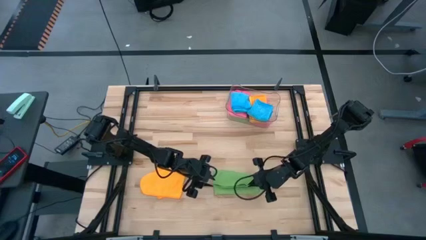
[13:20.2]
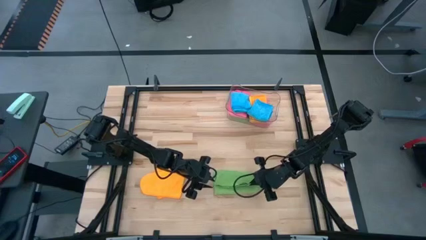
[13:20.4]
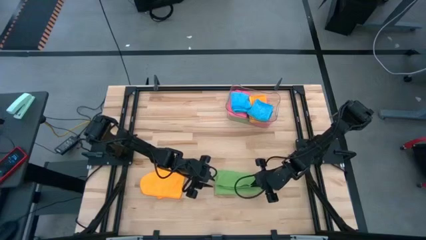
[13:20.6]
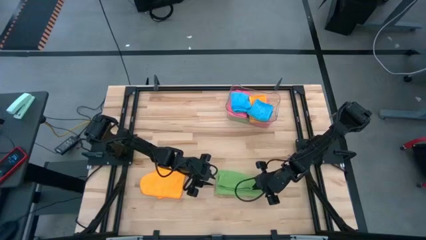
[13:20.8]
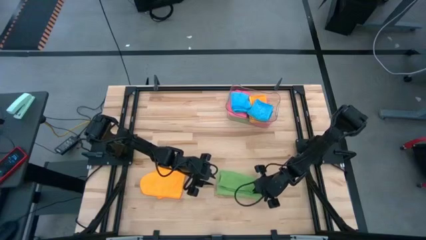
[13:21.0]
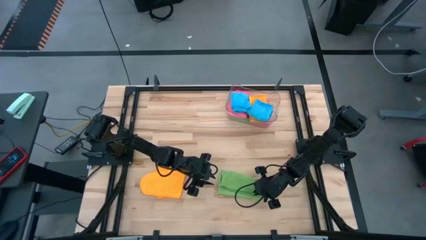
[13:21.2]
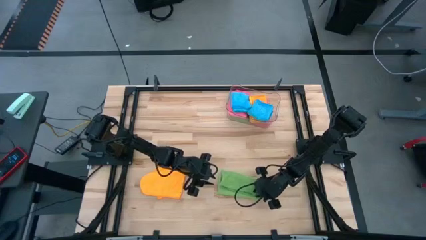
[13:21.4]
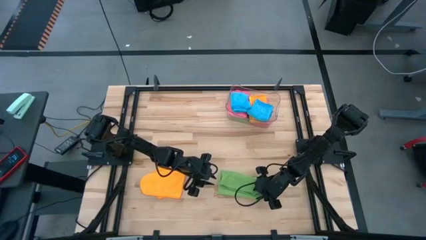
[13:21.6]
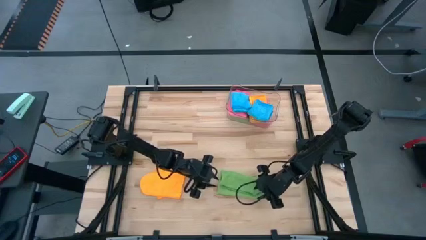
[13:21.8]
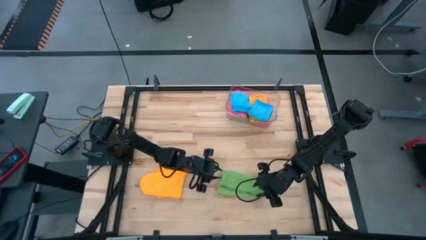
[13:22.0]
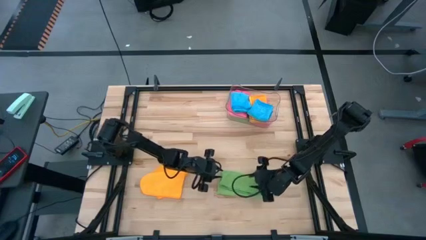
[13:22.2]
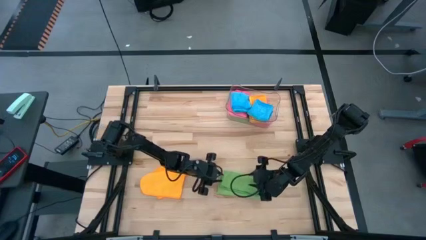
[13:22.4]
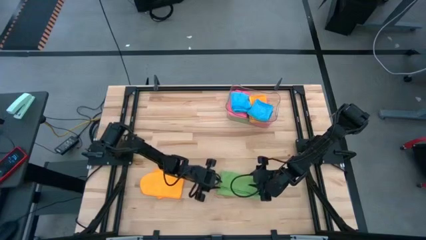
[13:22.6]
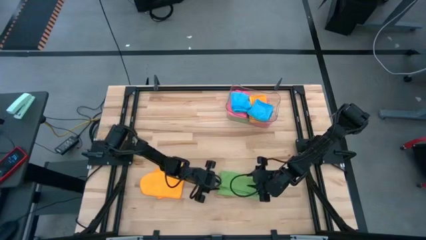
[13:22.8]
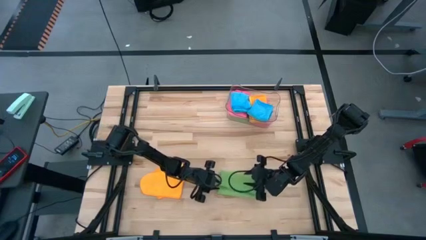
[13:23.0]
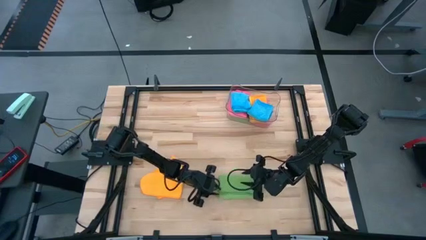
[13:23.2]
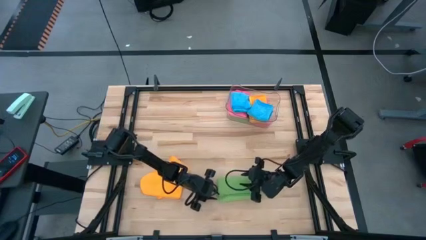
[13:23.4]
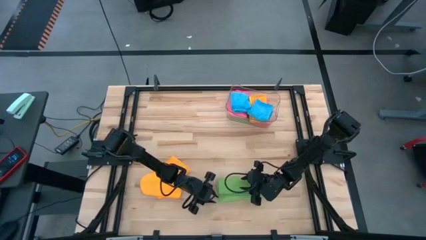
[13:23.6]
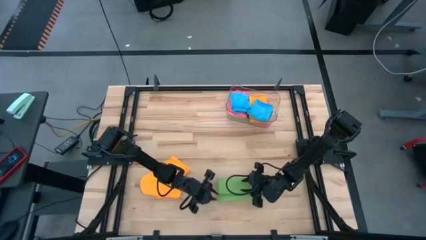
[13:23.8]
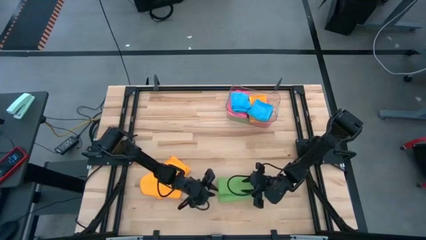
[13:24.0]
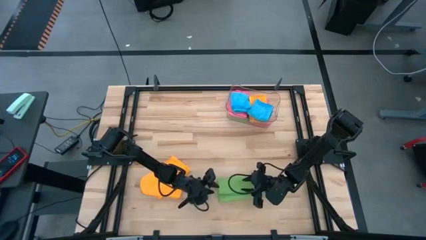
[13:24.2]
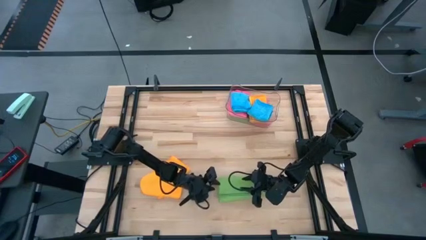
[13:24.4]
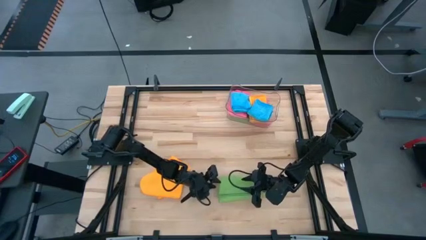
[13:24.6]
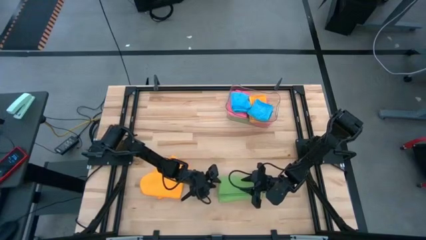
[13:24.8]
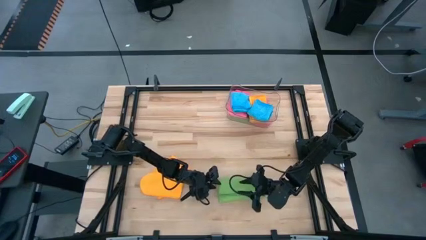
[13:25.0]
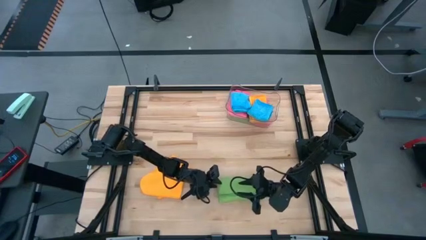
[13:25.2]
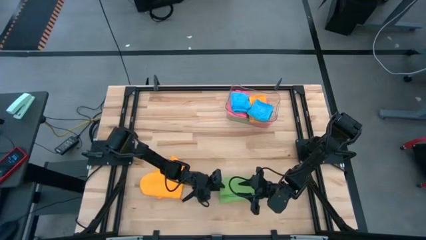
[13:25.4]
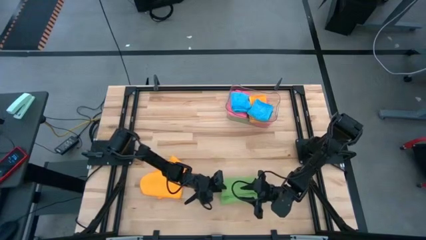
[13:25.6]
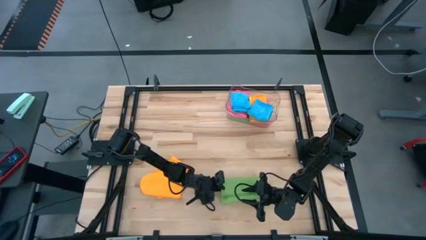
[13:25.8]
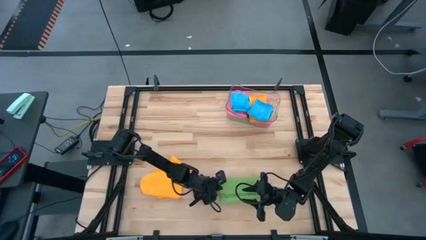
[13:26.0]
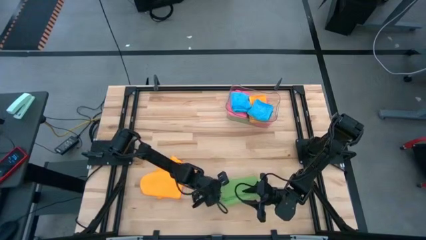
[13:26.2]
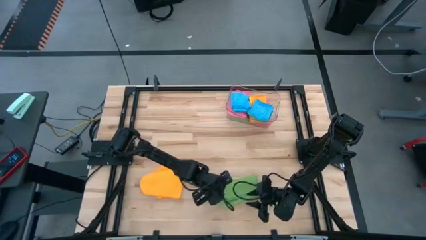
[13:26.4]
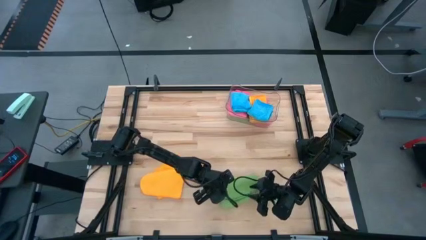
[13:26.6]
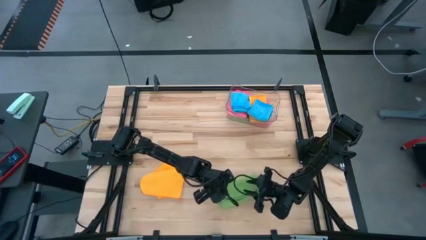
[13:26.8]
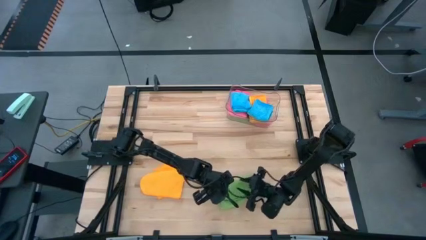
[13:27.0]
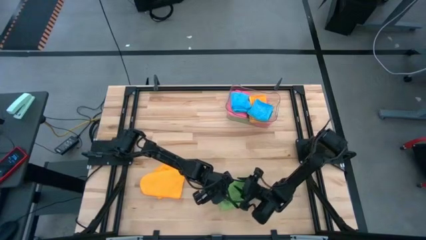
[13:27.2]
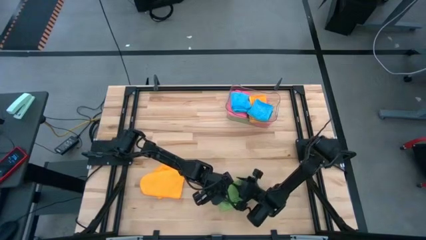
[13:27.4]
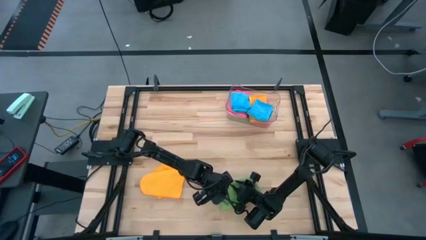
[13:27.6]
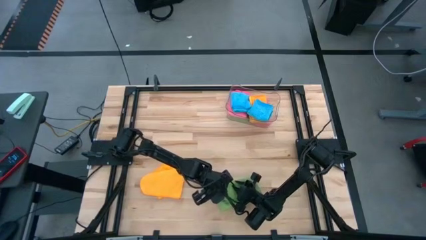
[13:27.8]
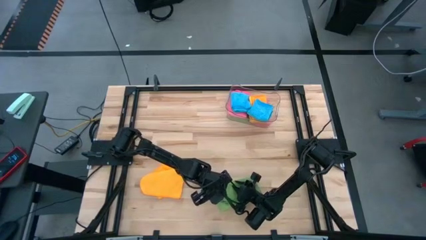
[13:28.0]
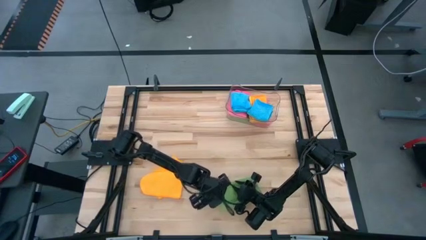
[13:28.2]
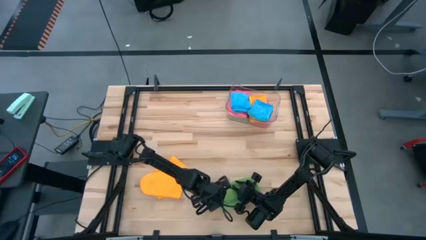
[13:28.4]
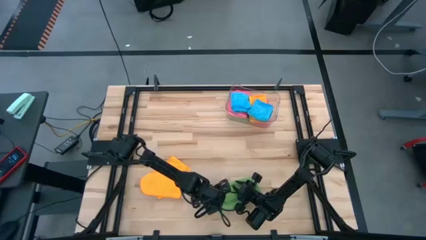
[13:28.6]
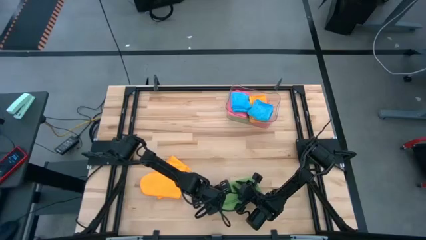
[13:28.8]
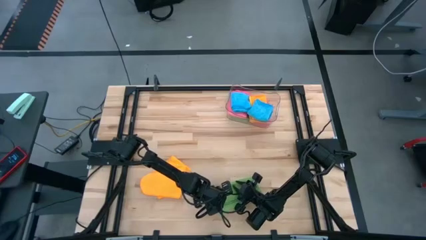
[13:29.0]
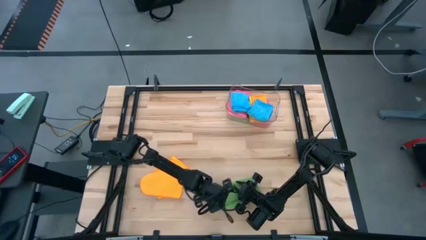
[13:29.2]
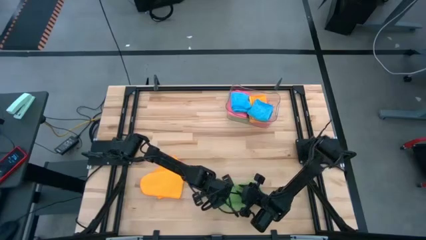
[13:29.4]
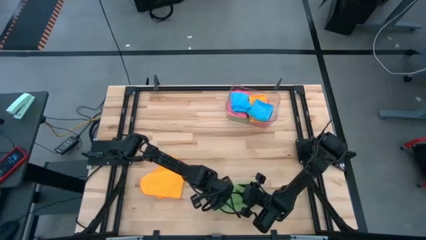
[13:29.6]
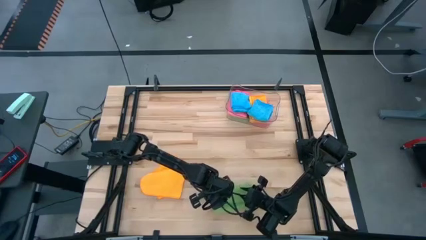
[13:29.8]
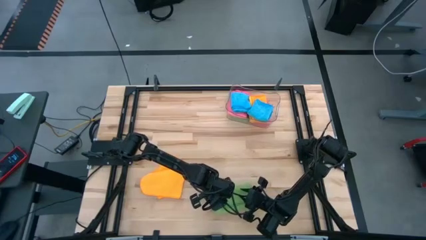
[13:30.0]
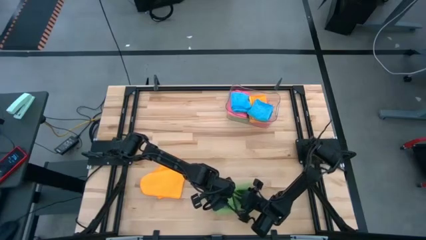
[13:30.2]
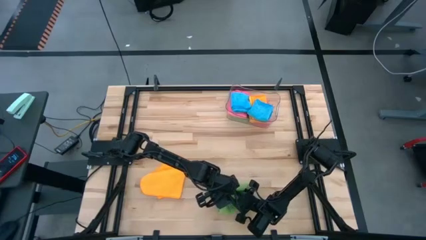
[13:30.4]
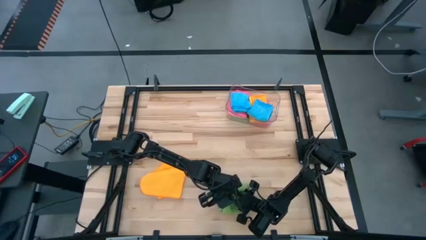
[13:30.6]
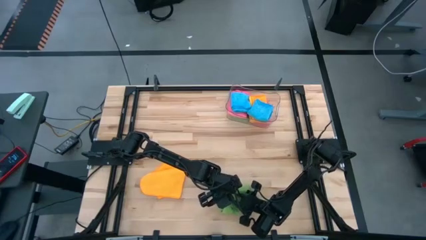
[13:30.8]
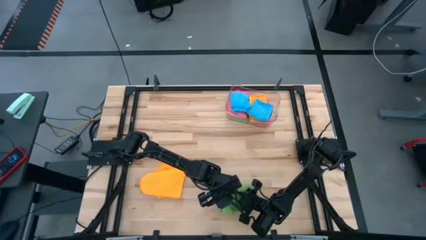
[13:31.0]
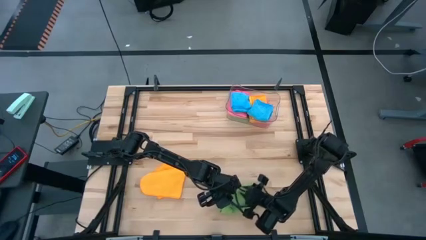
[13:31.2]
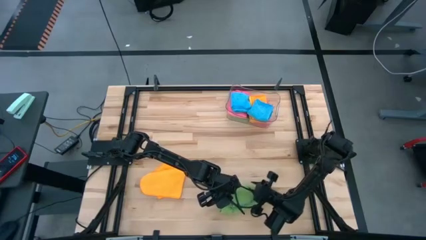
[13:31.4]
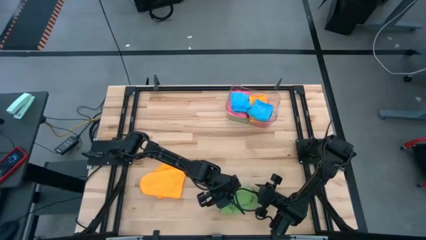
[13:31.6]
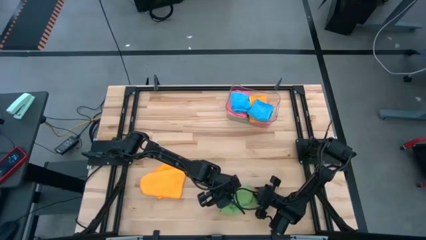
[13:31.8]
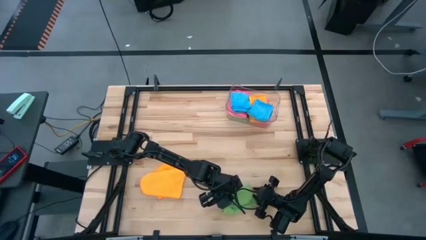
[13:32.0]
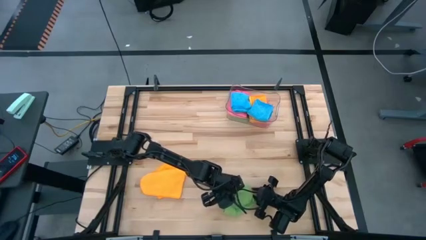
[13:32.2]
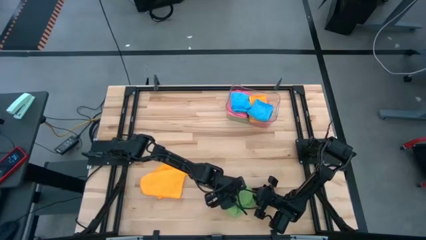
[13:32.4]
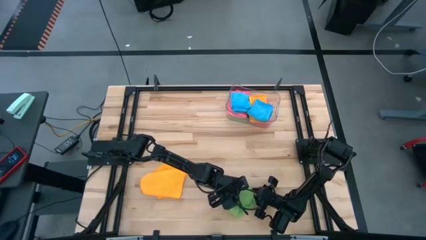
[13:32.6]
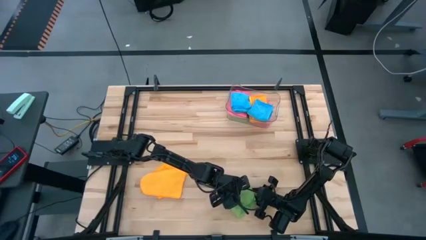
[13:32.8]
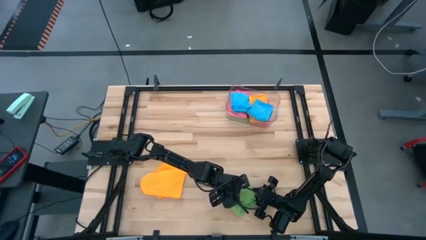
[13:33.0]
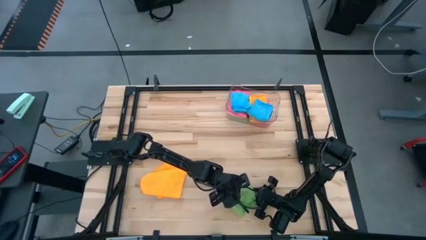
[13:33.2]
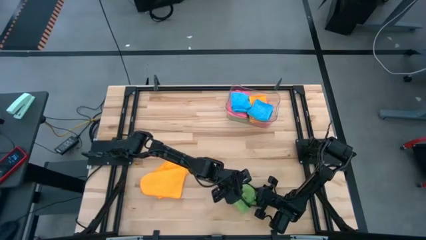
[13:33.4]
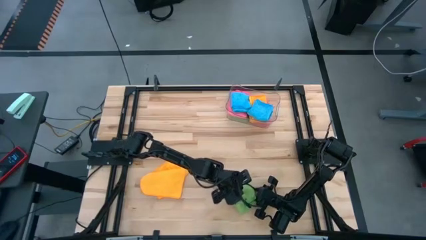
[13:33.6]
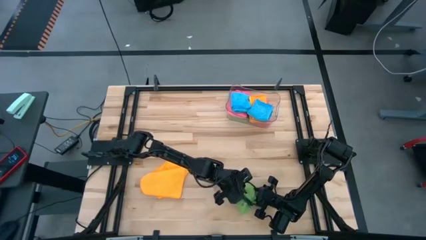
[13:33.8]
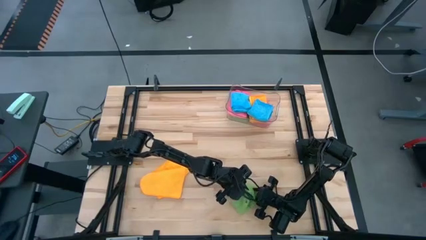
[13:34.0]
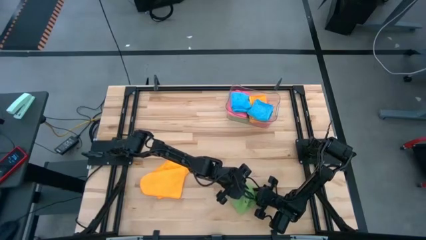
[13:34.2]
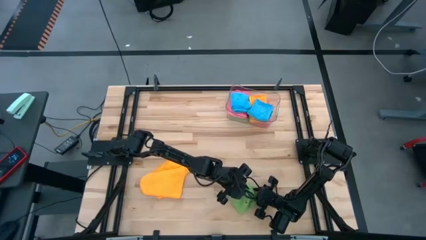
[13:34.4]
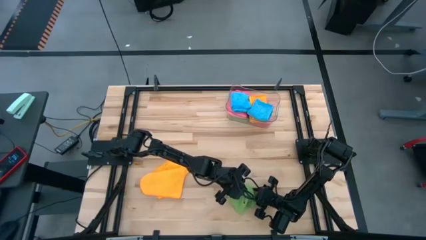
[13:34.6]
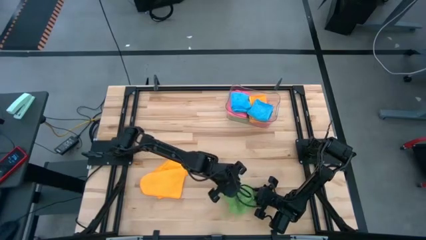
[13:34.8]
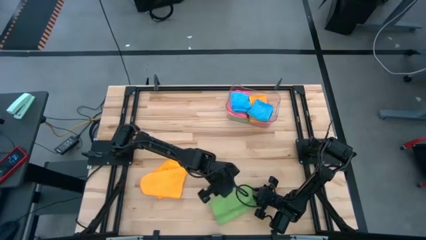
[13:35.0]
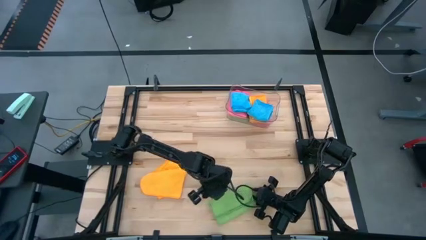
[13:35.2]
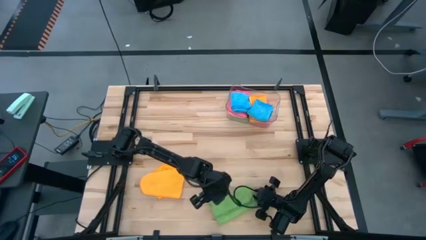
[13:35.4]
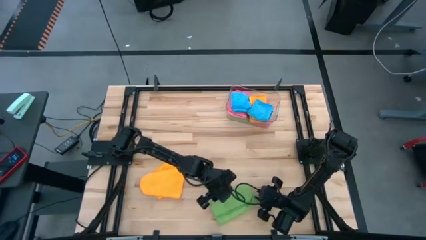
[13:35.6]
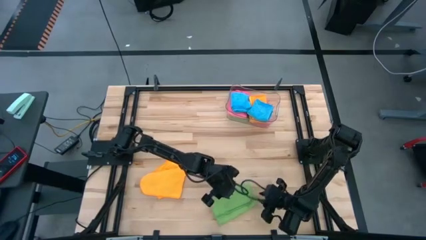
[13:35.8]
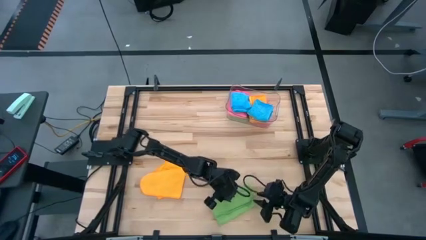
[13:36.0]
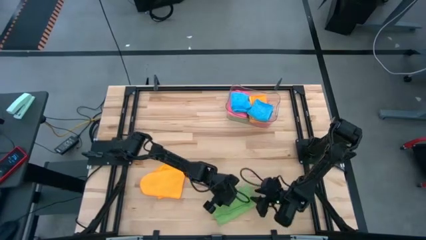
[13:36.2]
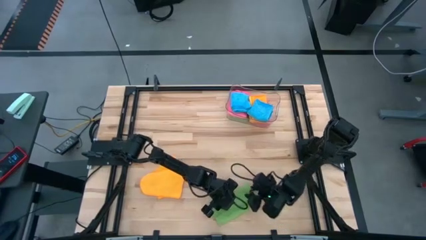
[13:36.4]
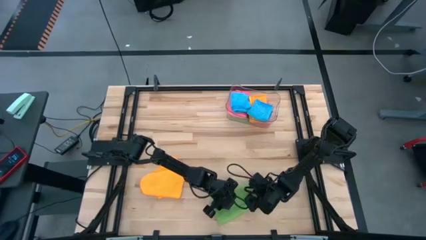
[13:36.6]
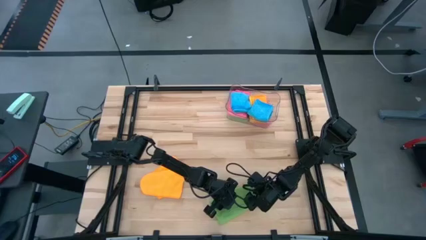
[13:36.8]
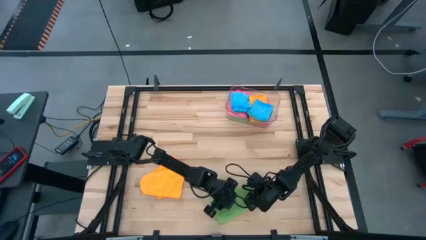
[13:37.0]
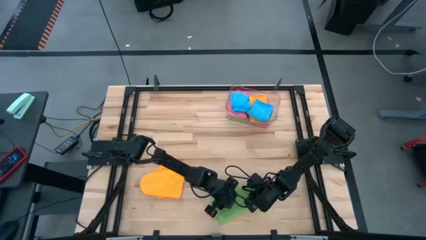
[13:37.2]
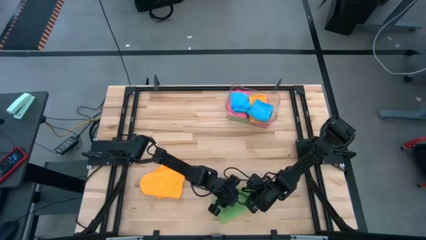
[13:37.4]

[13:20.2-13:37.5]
Task: Fold microfiber towels
Fold the green towel
